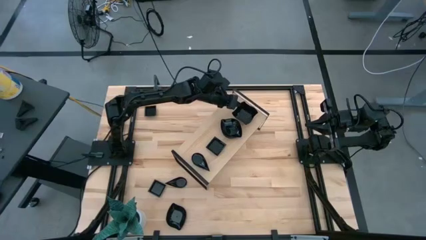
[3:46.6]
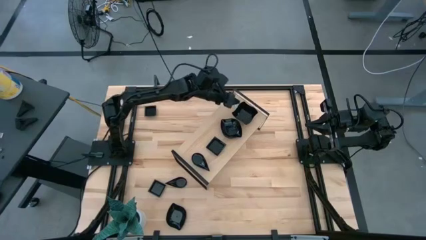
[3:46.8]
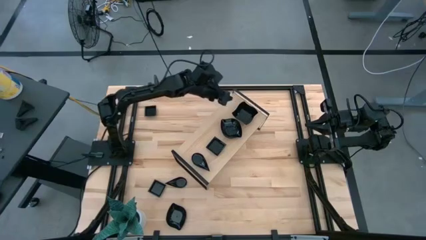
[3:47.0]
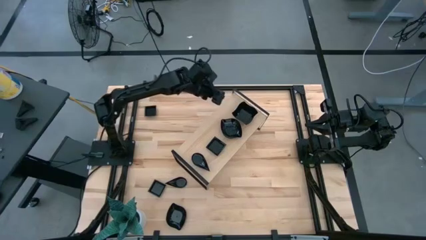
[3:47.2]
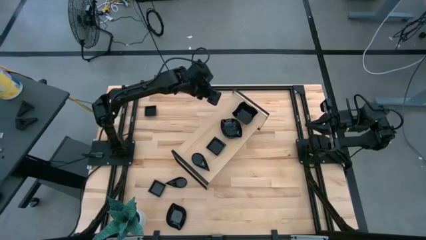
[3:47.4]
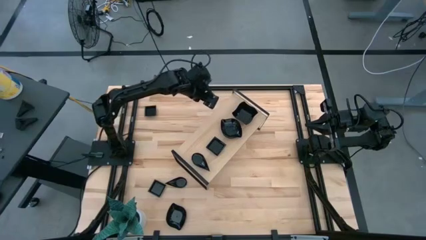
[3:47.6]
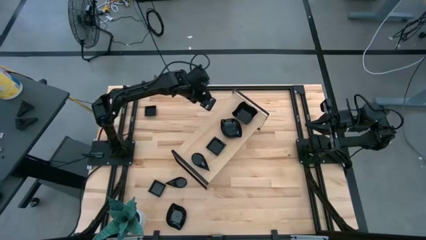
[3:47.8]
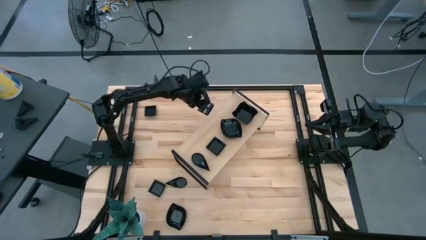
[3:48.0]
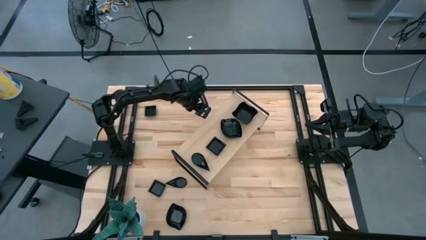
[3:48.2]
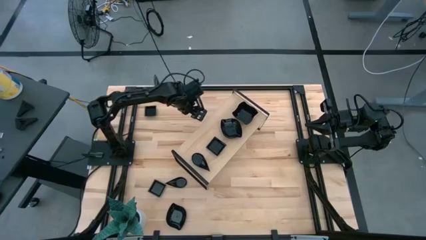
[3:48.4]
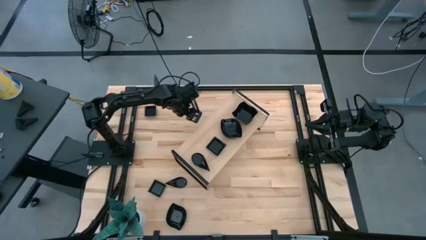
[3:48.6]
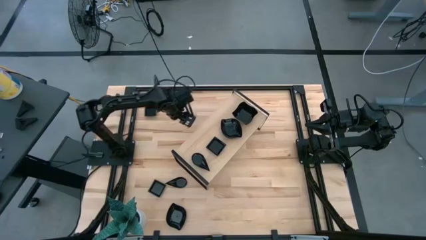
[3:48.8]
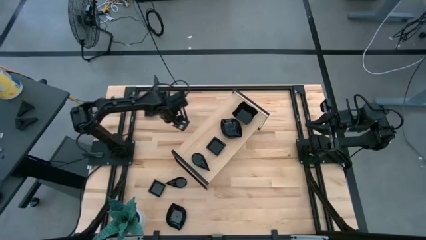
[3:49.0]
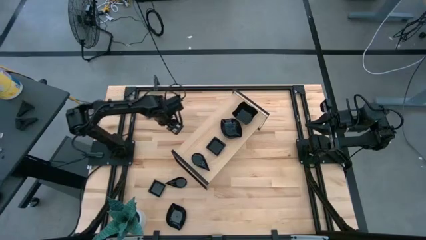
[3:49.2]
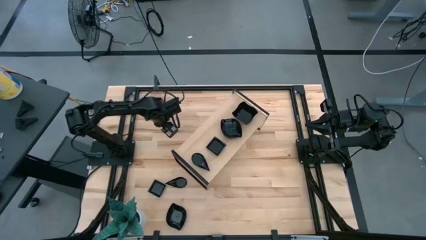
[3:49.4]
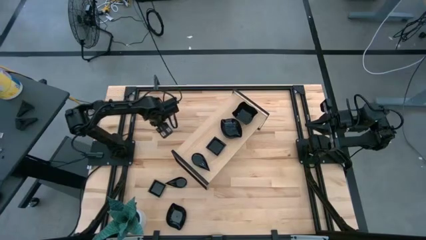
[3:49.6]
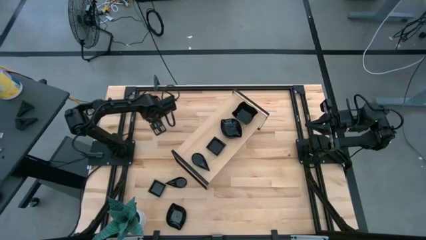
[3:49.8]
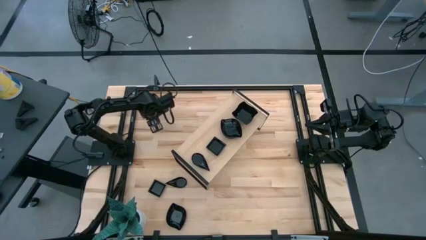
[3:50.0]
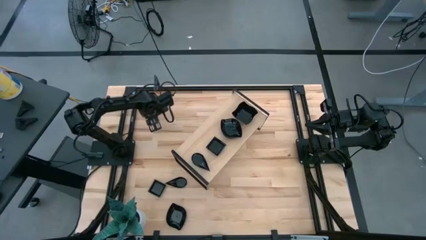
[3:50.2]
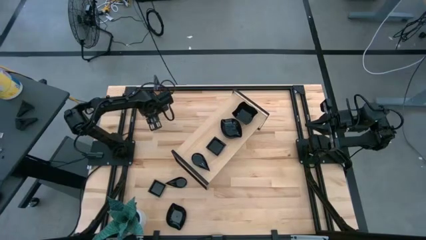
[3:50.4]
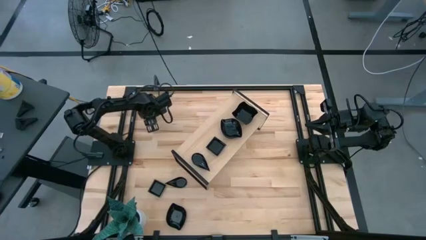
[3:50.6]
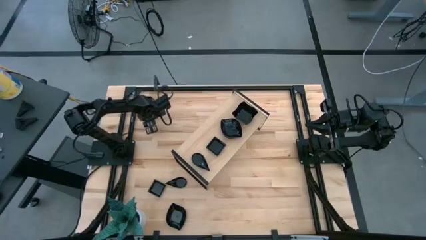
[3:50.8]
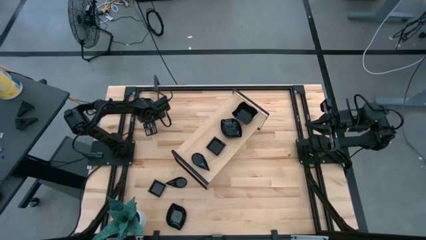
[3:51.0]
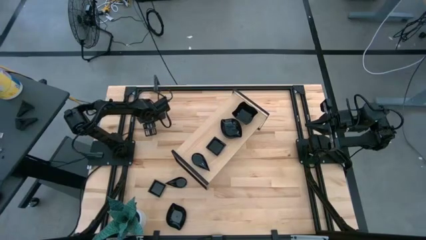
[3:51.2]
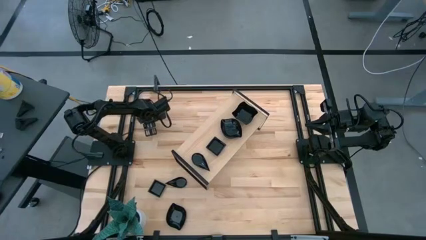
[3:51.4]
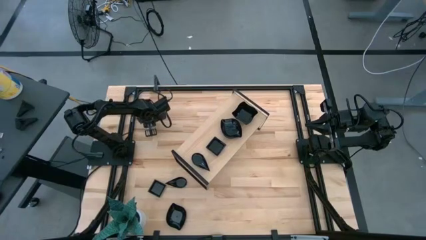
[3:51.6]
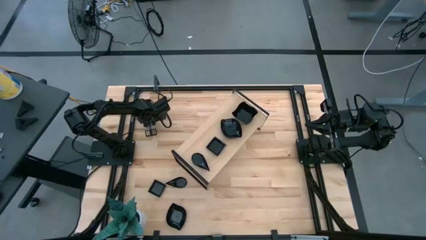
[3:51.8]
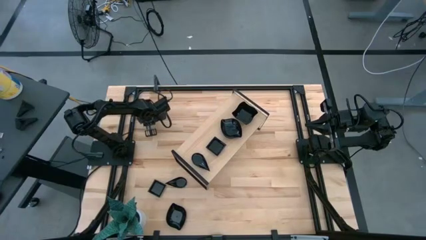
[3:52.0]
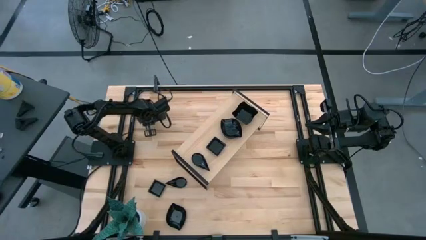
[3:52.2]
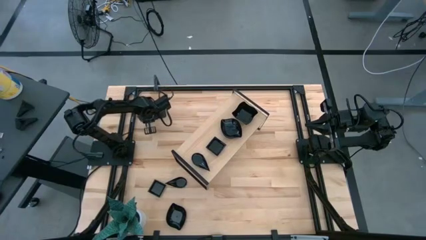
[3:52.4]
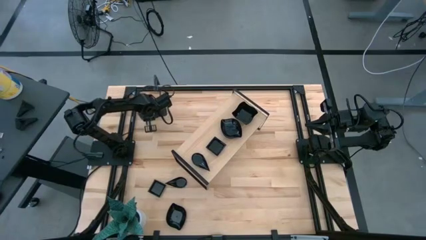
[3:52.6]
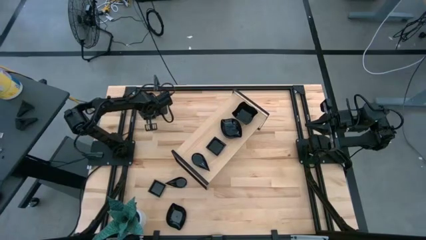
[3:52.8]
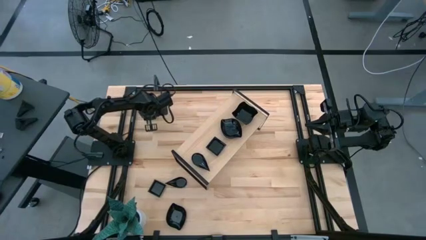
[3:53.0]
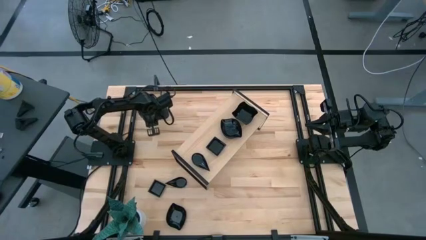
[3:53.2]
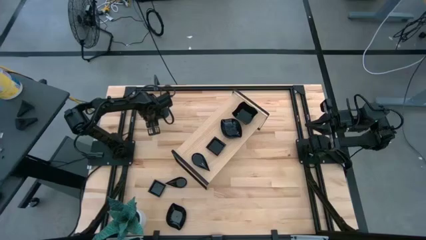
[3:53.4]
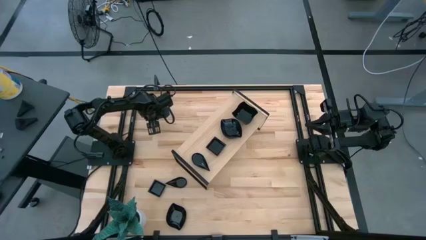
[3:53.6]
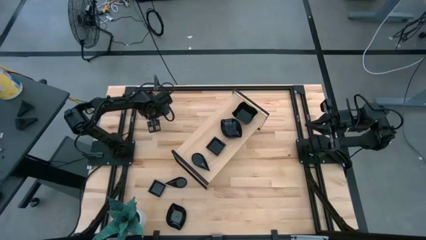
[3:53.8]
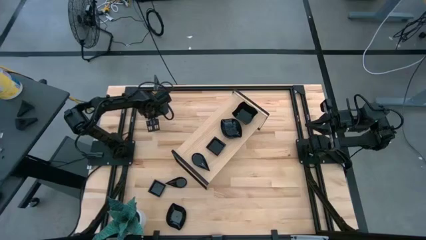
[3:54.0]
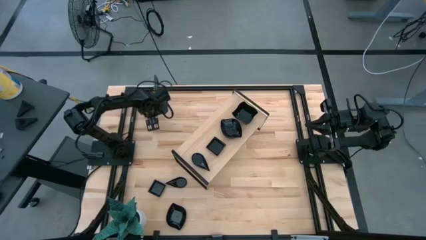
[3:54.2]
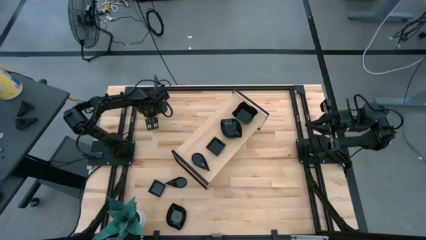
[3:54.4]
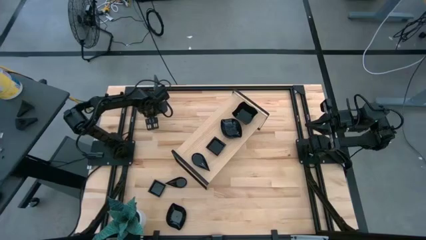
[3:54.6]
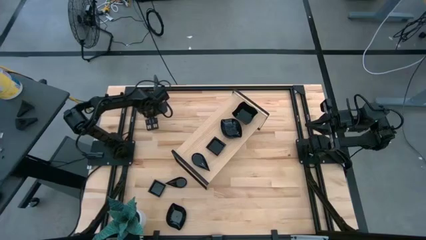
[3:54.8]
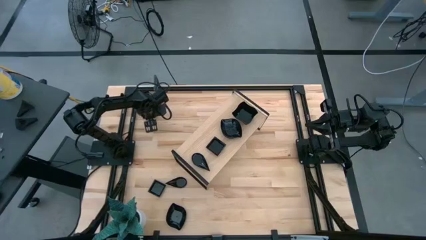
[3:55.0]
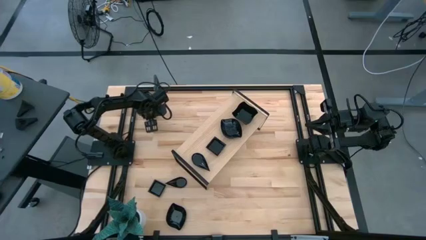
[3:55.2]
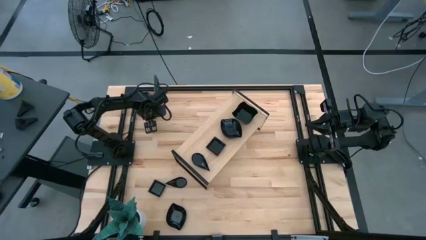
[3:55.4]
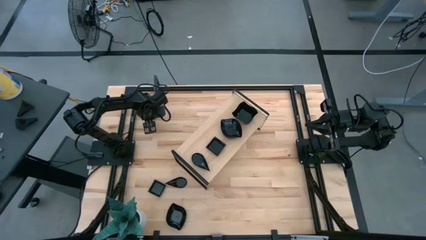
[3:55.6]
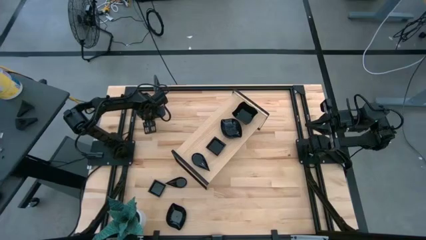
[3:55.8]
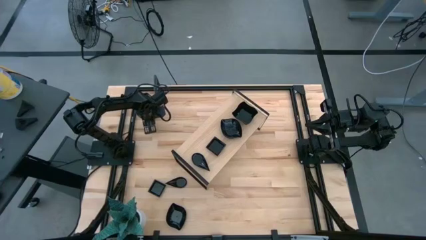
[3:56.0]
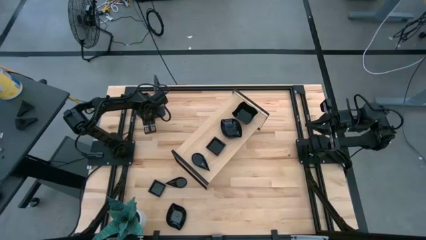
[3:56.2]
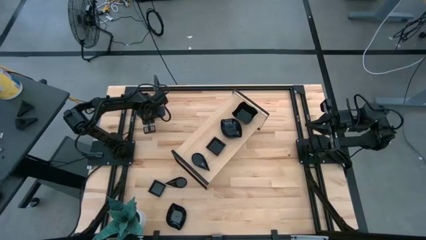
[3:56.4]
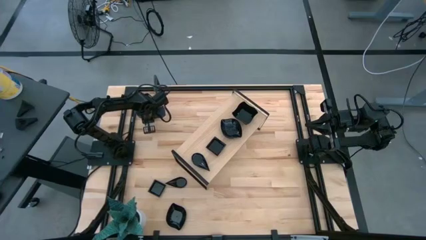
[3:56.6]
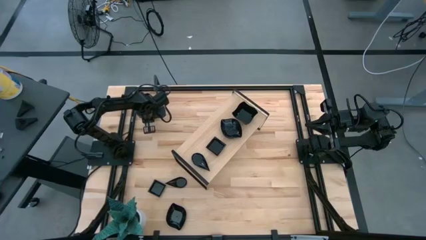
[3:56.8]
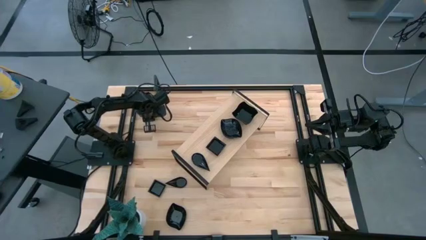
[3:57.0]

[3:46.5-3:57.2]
Task: Pick & Place Mini shaped plates
Stack the black square shaped plate on top of the black square shaped plate on the shelf

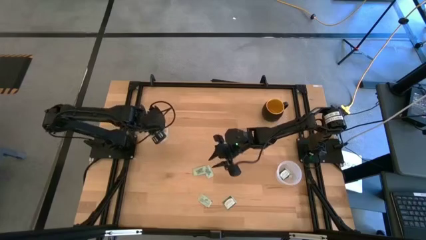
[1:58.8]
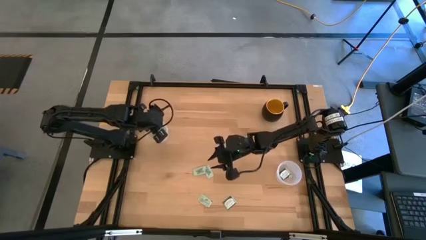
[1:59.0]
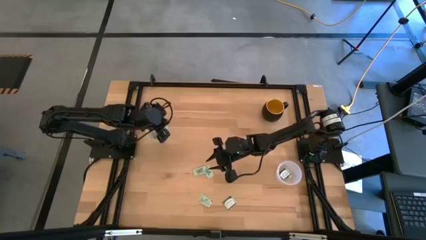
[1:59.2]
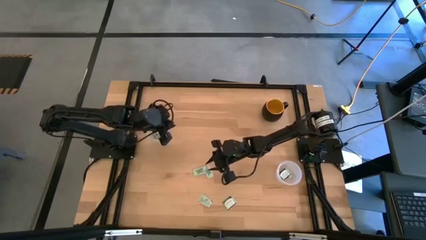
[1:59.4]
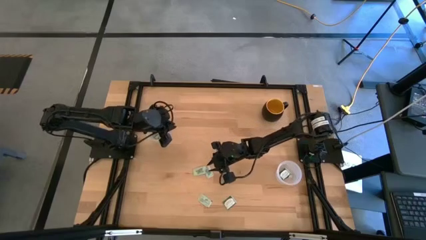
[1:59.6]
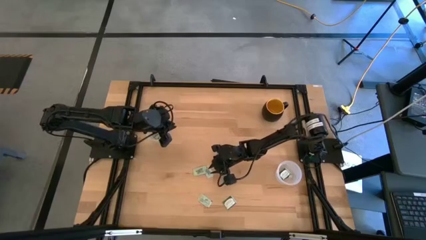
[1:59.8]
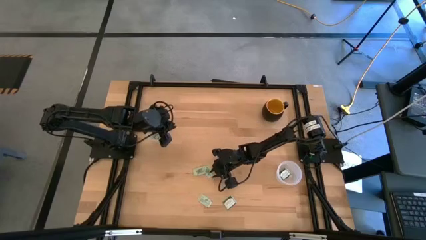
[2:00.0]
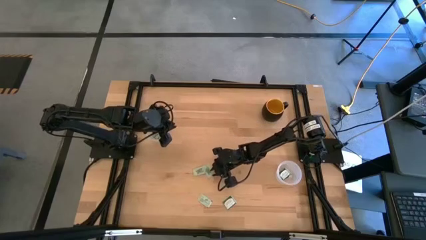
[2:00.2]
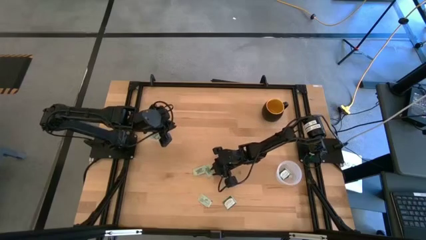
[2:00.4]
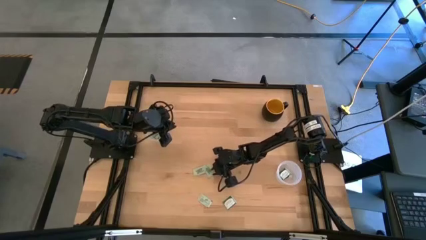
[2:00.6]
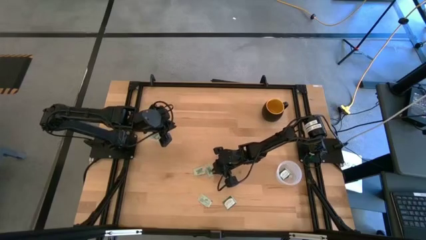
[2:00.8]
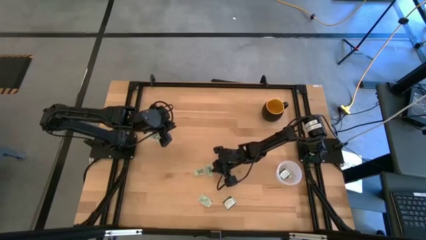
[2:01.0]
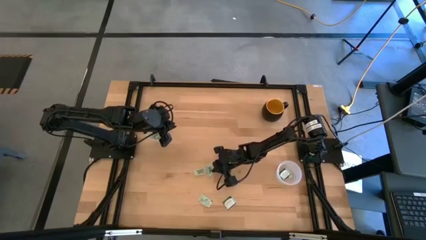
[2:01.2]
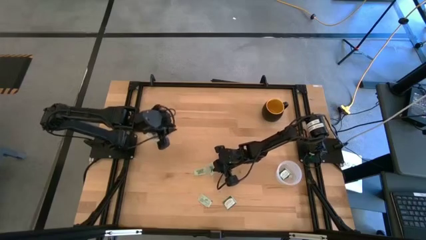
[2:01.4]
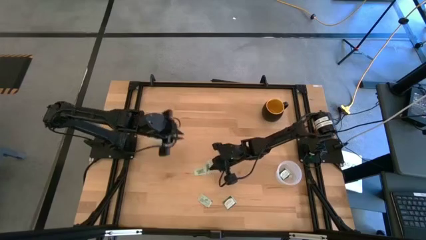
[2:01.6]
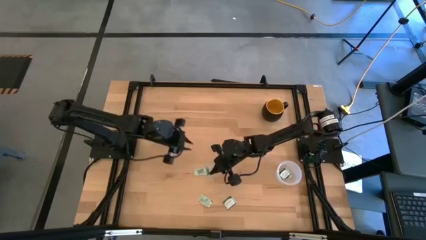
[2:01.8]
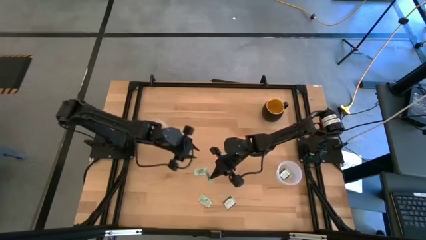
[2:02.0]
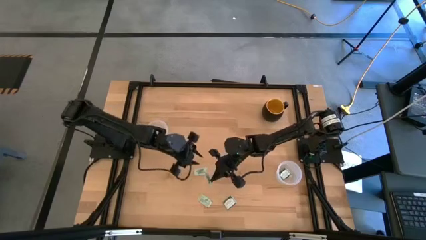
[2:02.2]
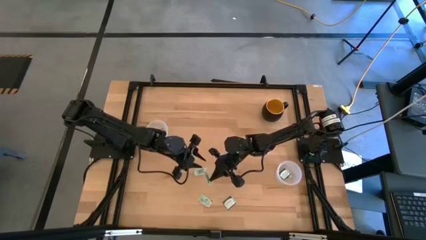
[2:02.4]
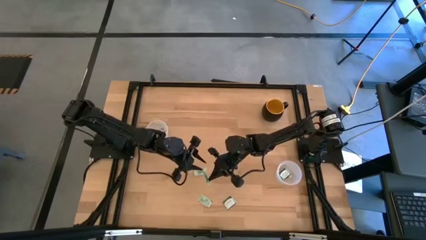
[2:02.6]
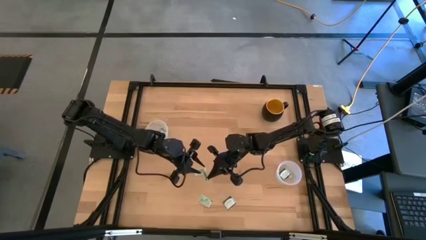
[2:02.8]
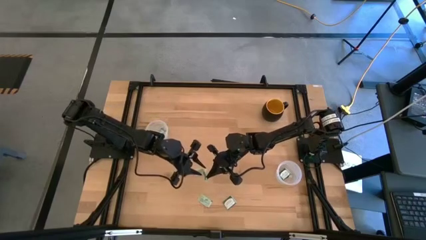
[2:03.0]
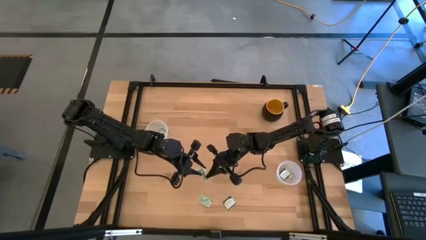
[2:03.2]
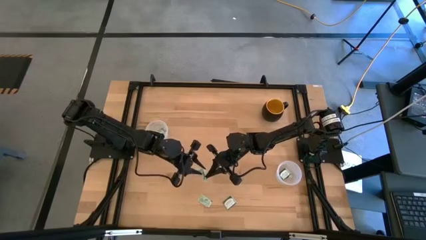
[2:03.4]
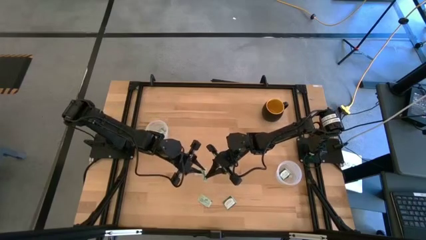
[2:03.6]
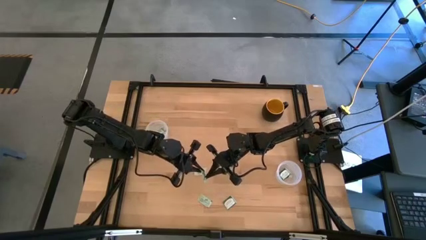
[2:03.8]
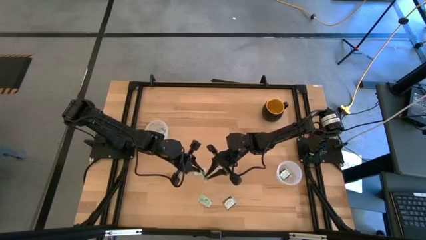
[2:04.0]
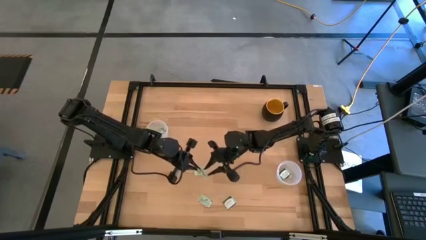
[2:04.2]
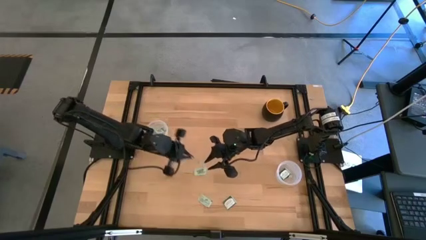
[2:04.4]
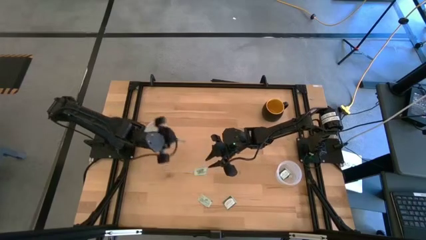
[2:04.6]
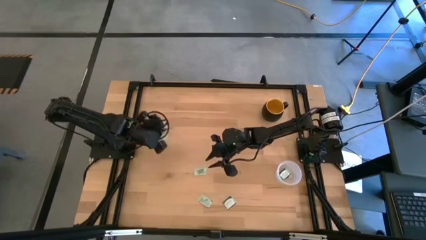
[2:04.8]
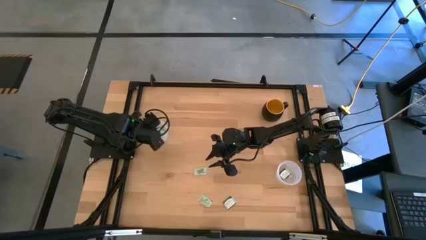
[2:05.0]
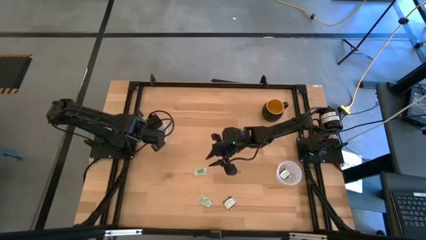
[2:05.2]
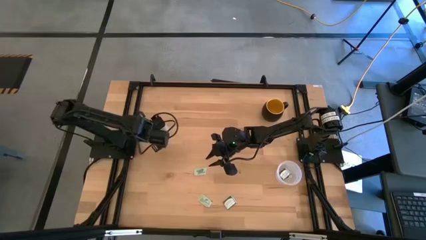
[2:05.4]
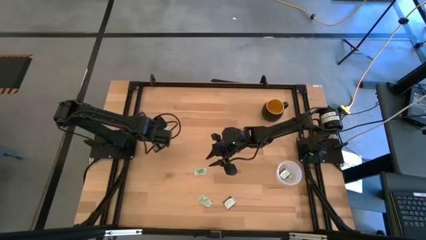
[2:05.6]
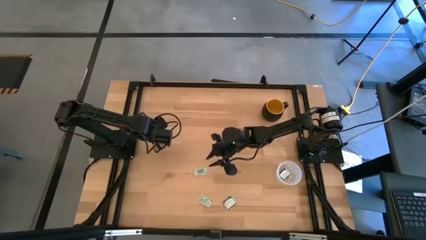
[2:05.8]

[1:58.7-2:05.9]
Task: Pick and place Stevia / Truvia into bins
Put the white stevia packet into the left transparent container
